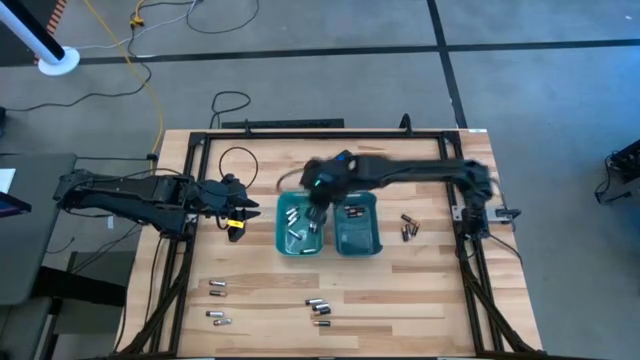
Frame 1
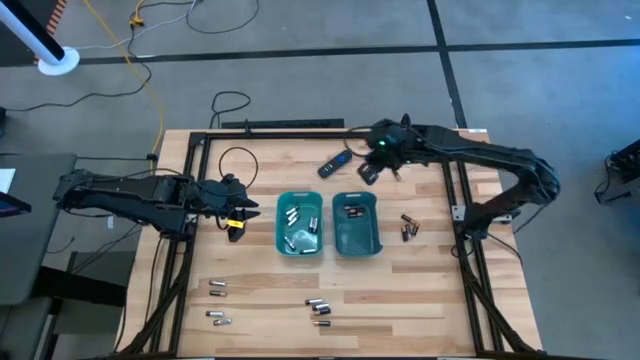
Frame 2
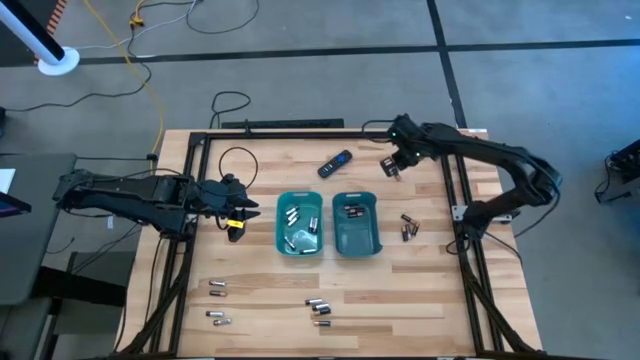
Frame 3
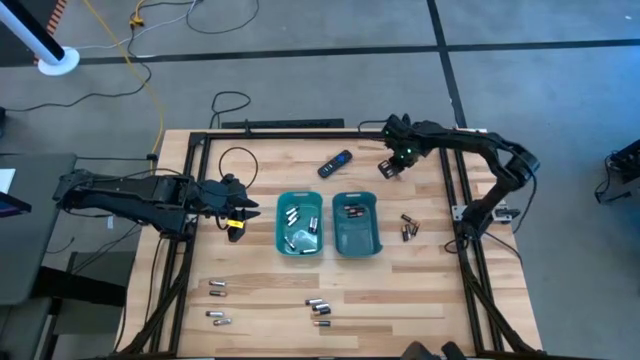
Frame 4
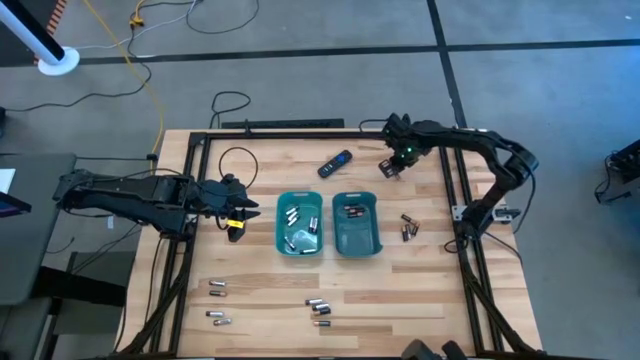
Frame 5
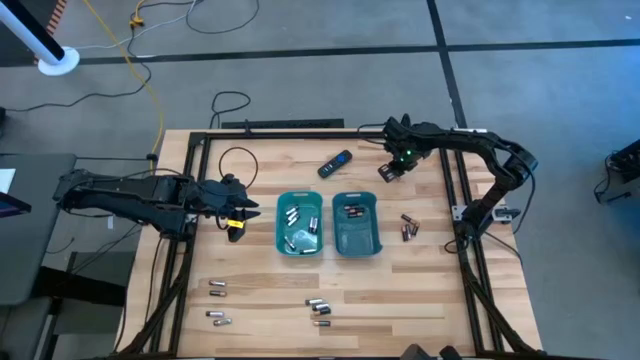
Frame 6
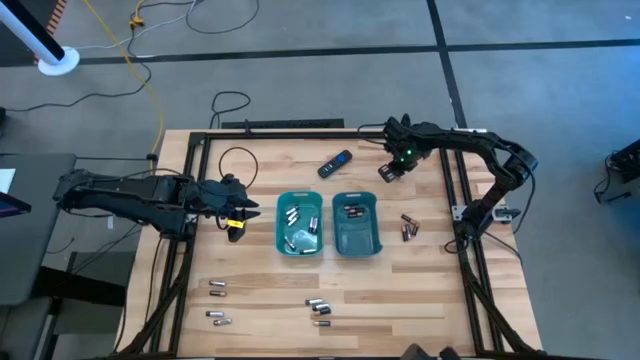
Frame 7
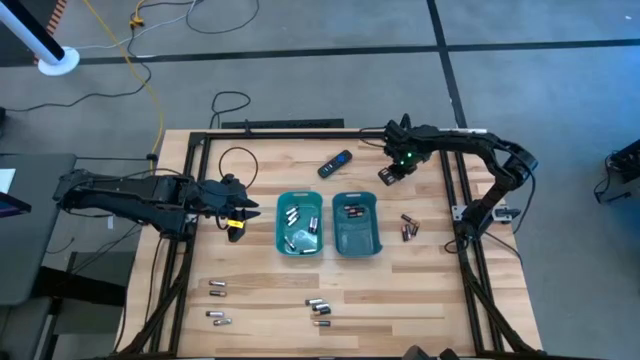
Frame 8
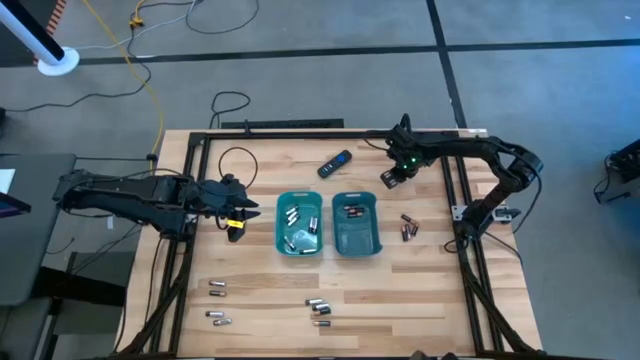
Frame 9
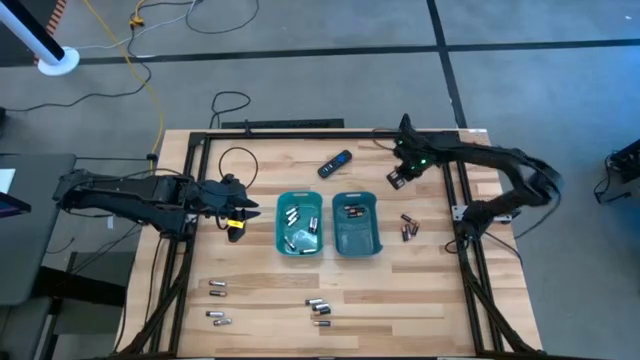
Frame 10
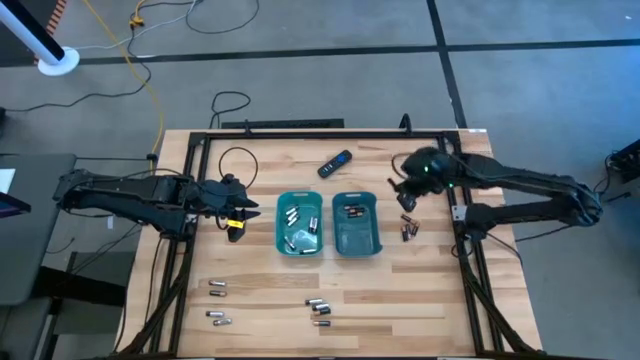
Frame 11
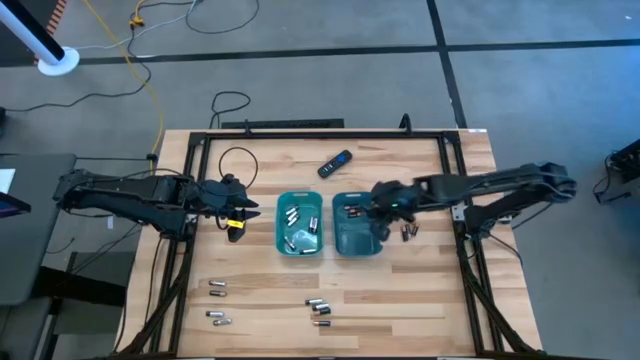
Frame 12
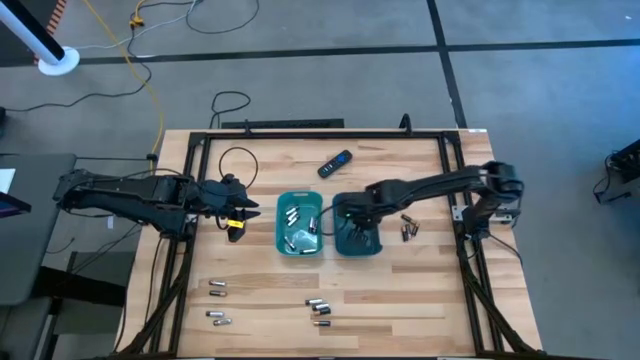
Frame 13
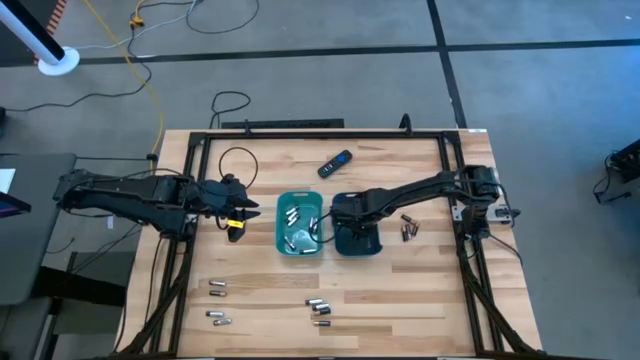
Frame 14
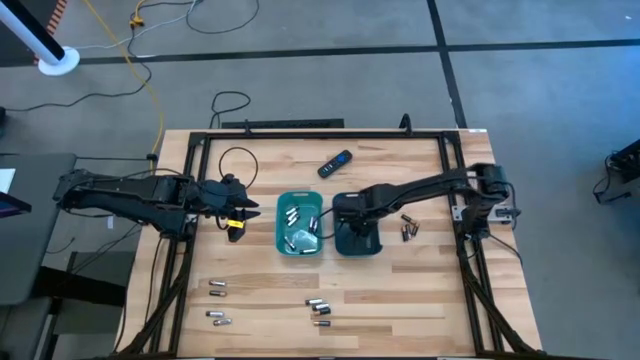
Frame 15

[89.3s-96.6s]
Task: Sort batteries
Put the copper and black battery into the blue bin

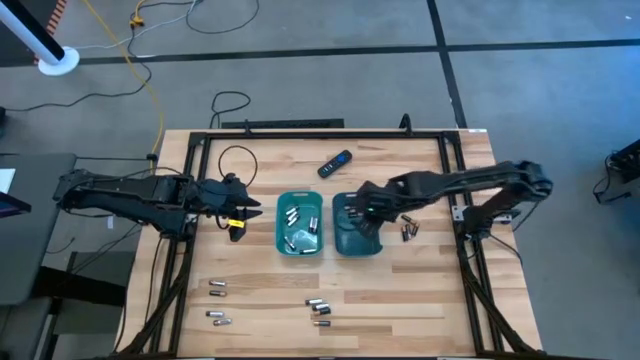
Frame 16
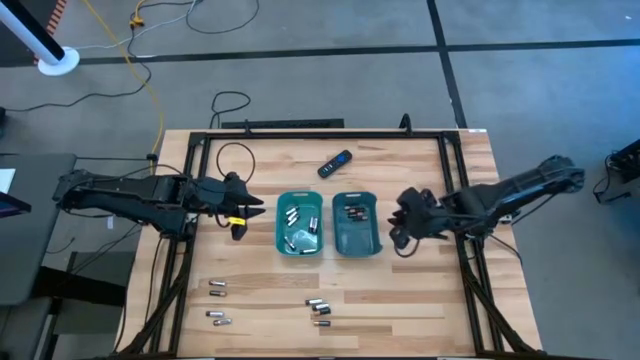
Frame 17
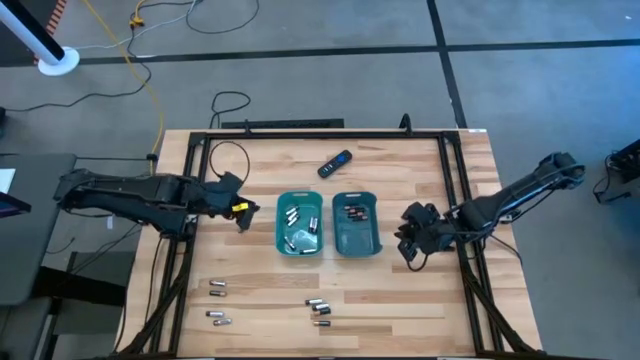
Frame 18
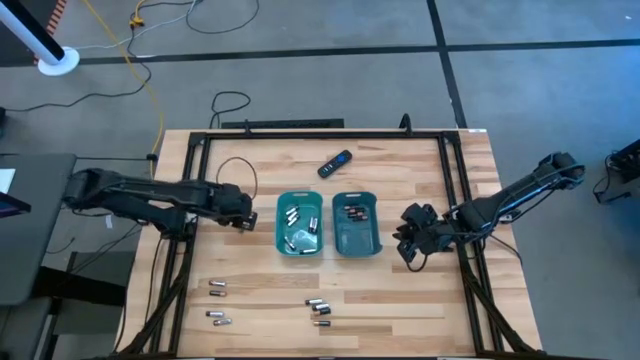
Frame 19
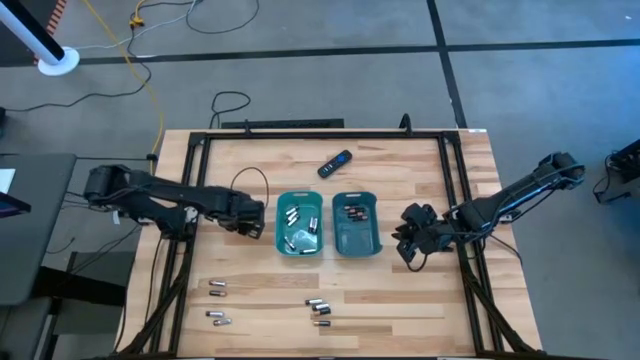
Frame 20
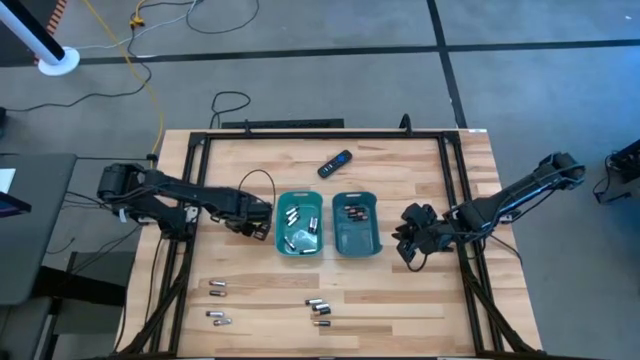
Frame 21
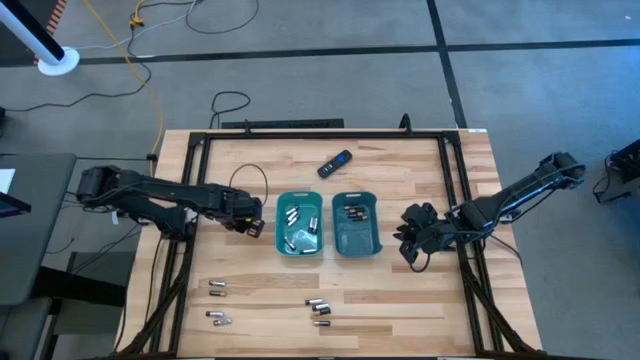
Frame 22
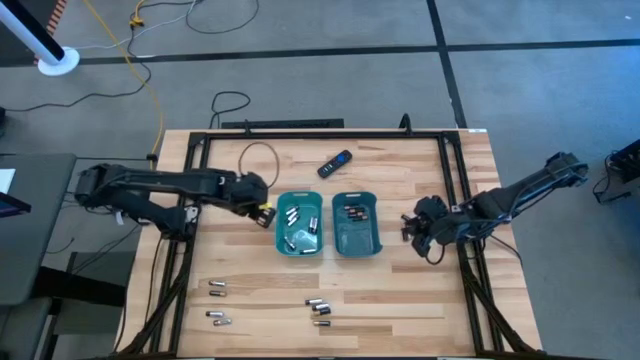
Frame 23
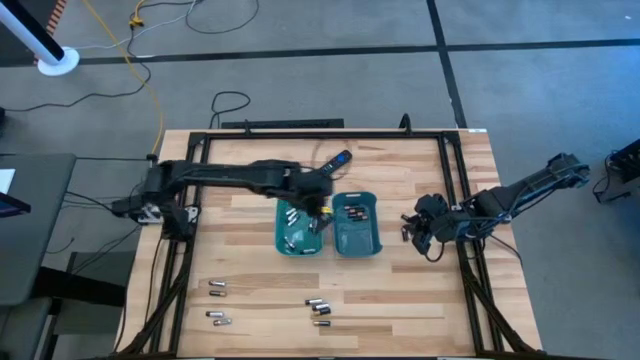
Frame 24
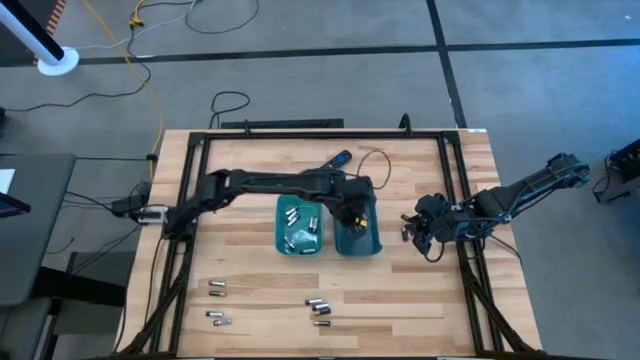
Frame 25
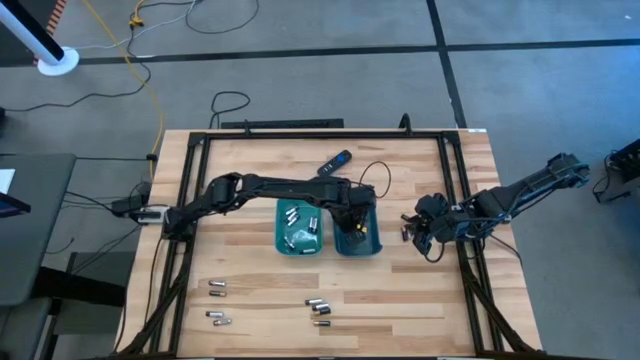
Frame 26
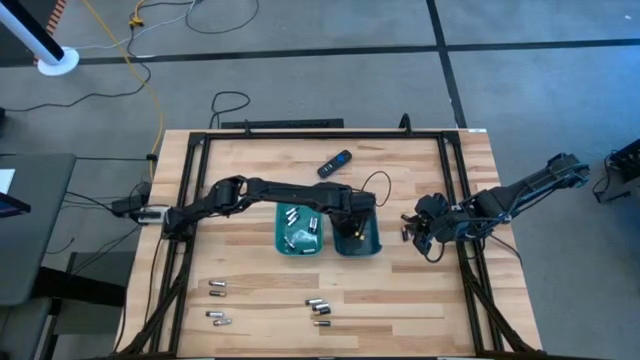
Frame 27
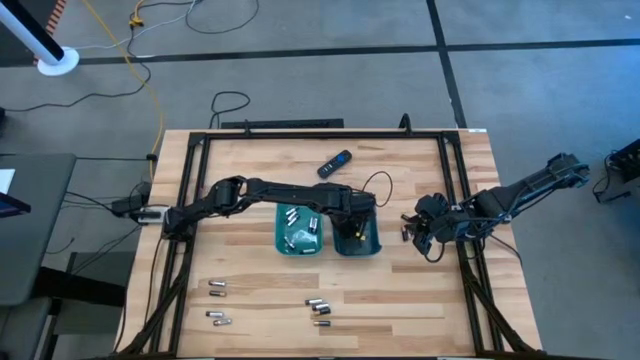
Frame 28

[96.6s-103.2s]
Put the copper and black battery into the blue bin

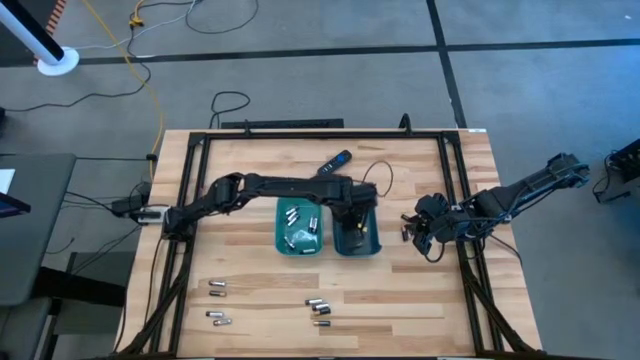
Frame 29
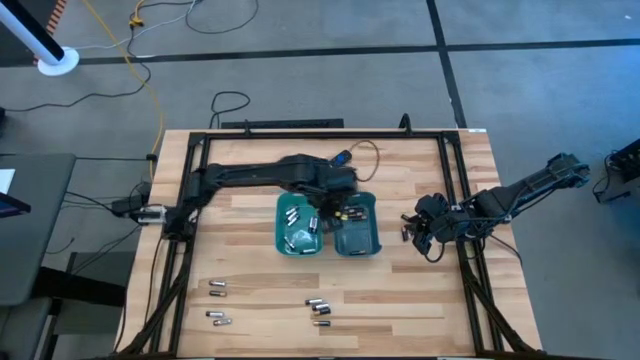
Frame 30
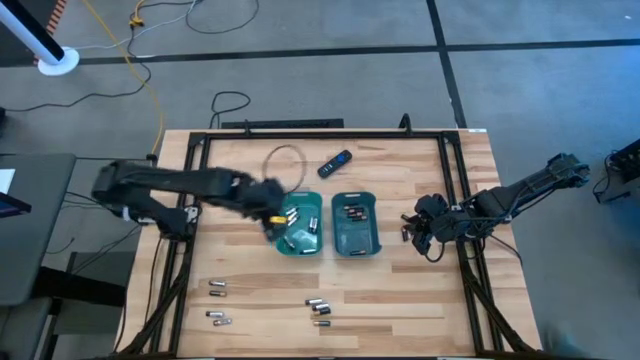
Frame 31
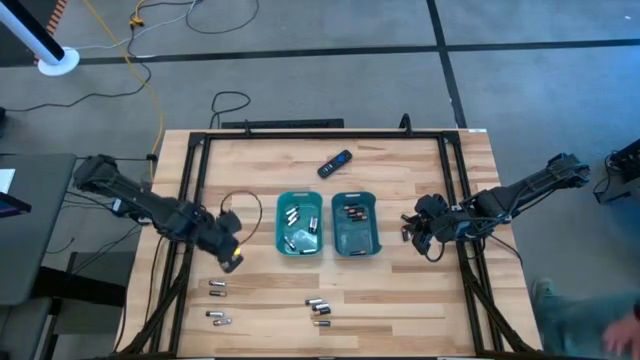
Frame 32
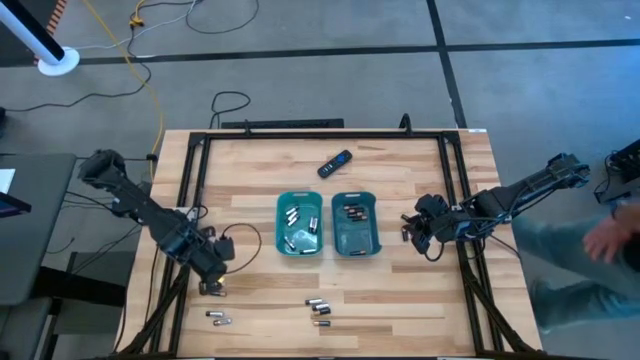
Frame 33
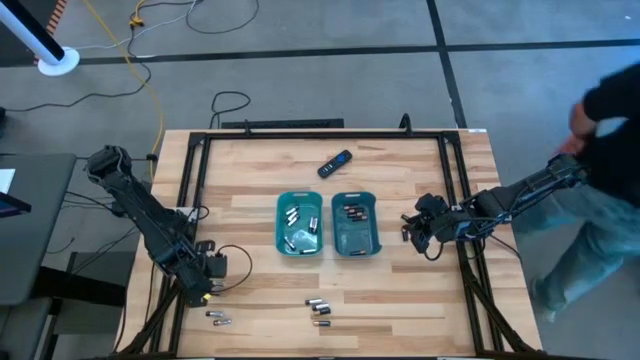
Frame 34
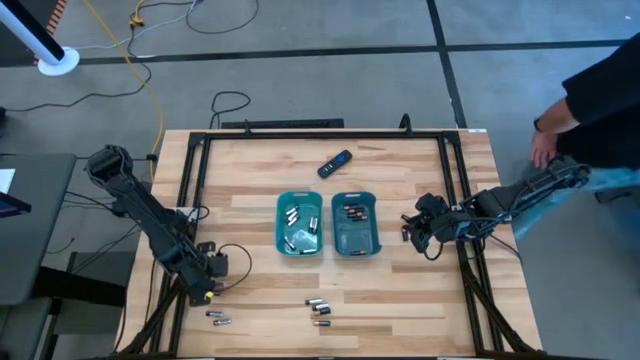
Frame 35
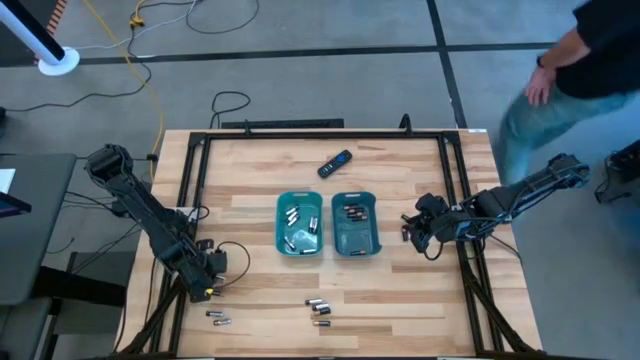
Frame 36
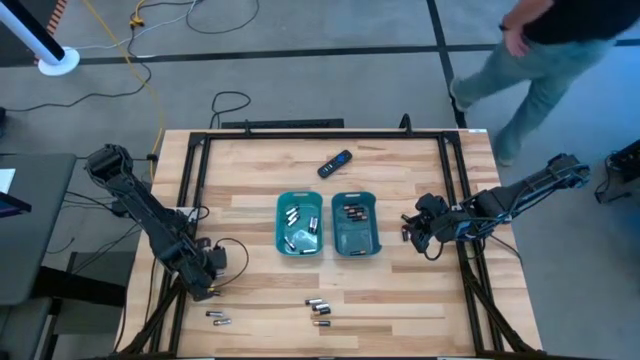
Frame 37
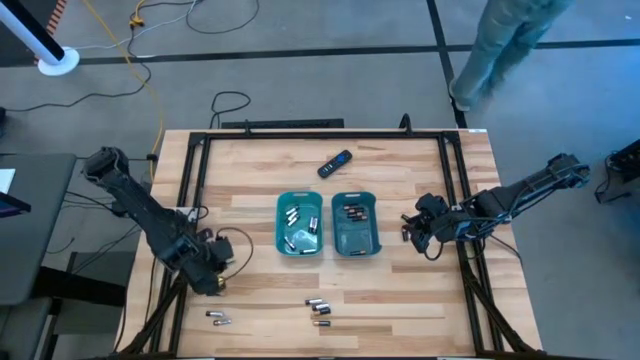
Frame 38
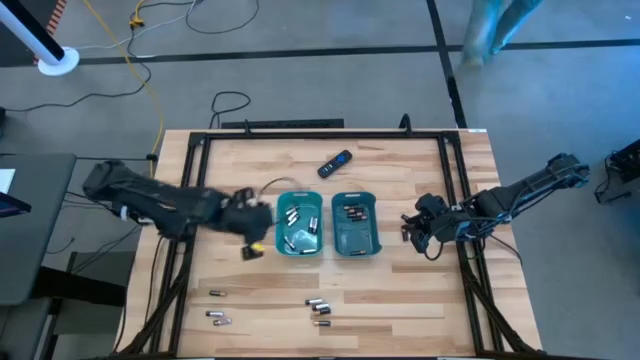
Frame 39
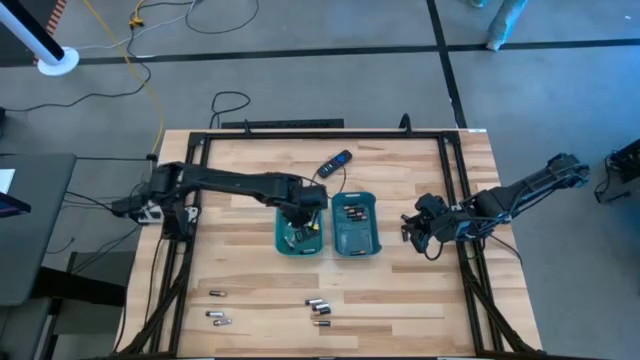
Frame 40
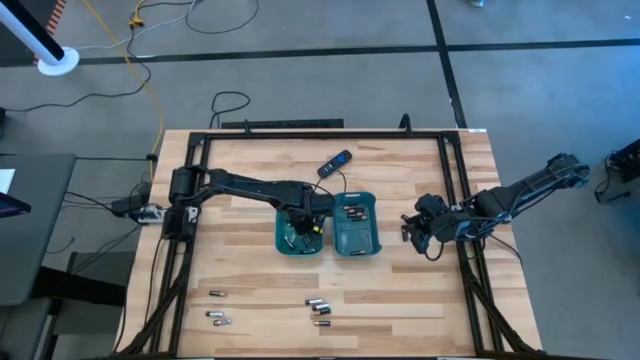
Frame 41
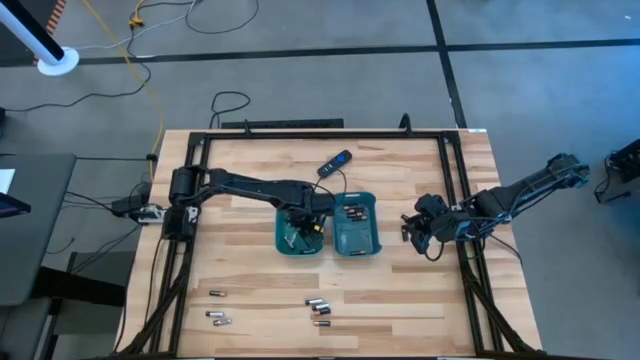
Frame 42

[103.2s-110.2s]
Put the silver and black battery into the green bin
